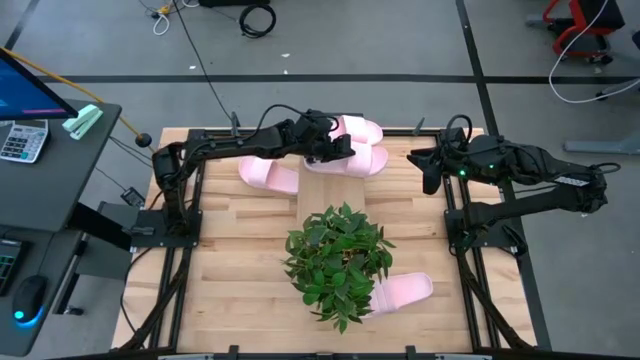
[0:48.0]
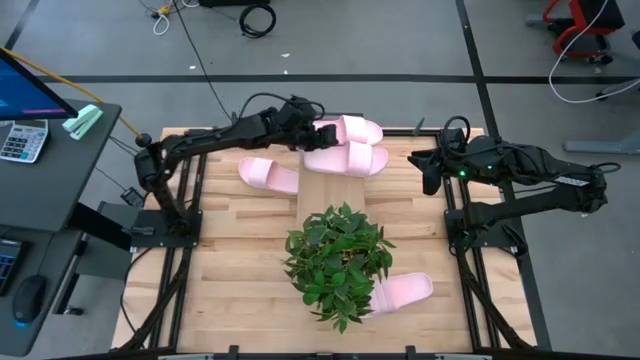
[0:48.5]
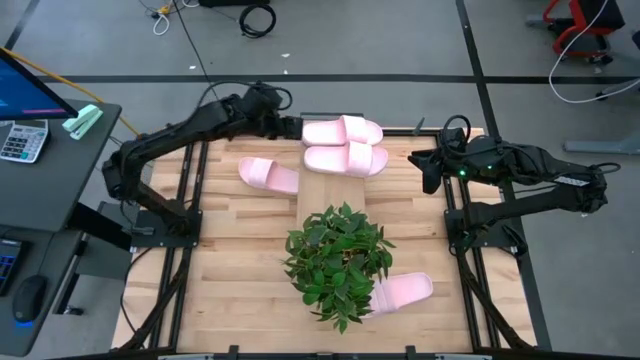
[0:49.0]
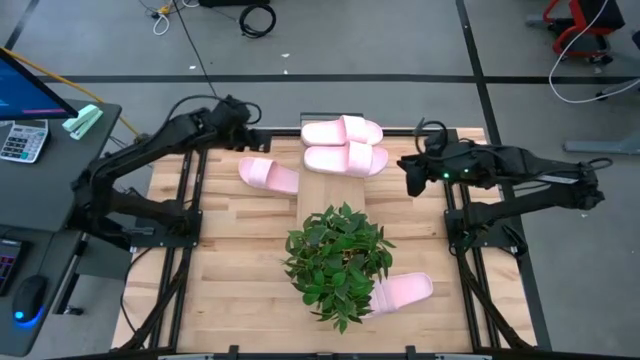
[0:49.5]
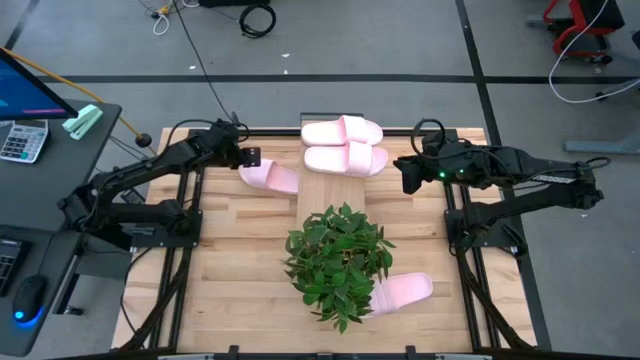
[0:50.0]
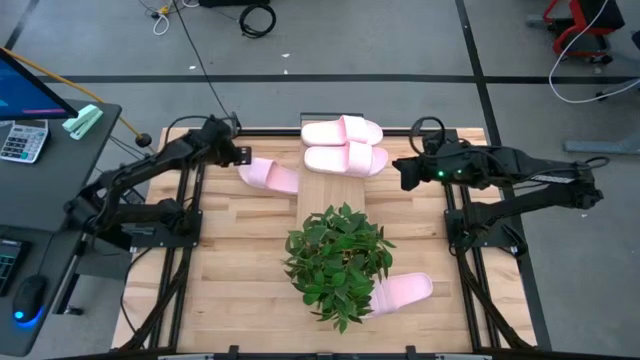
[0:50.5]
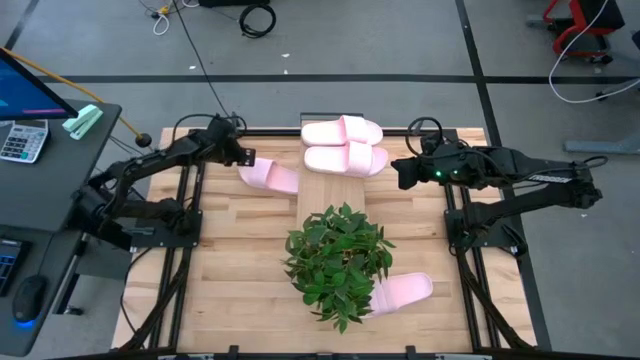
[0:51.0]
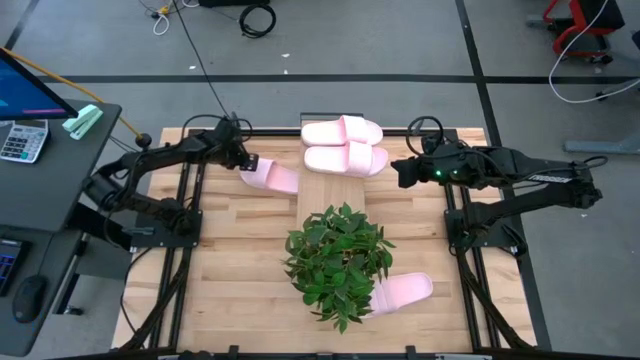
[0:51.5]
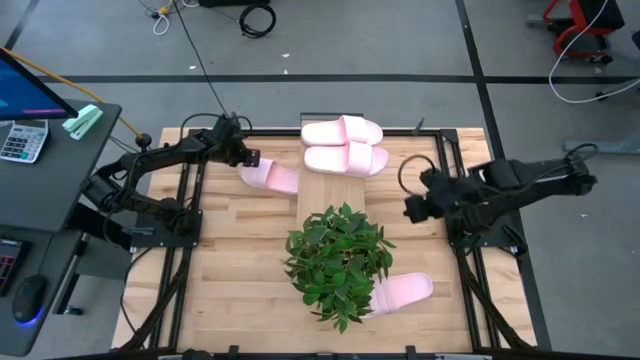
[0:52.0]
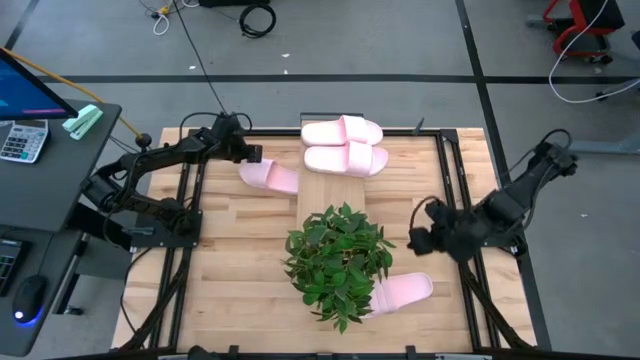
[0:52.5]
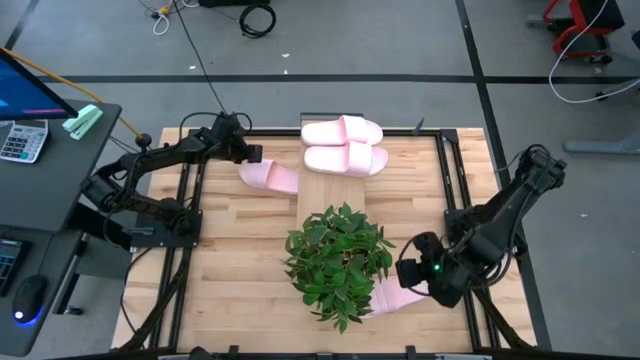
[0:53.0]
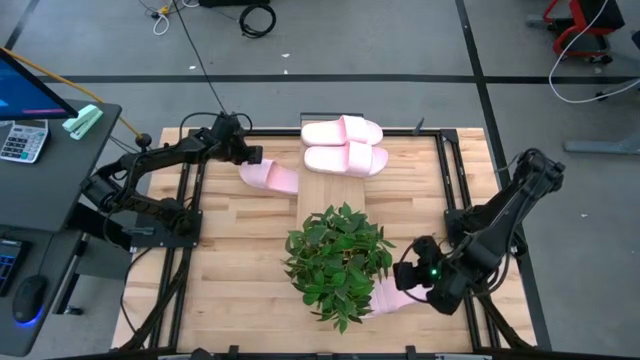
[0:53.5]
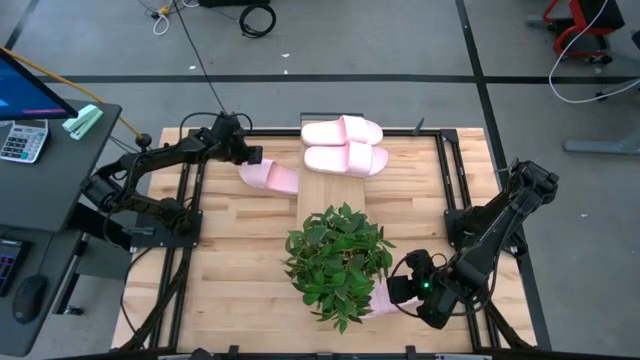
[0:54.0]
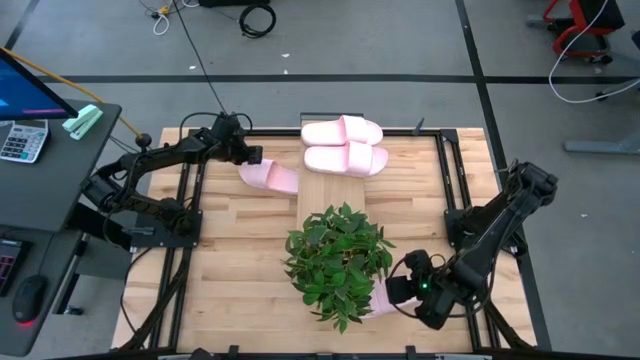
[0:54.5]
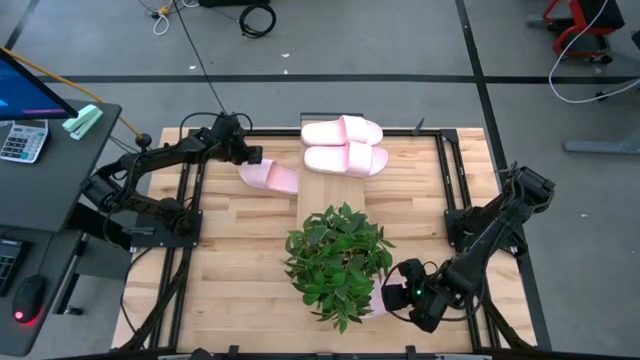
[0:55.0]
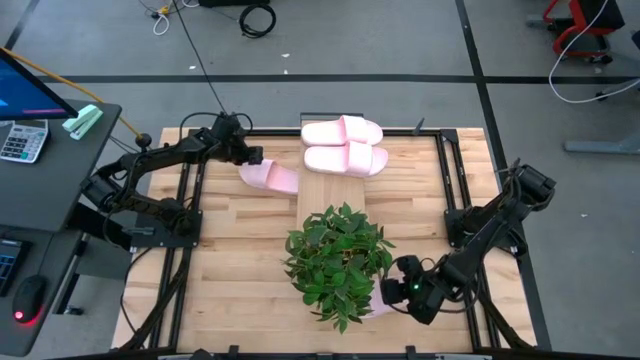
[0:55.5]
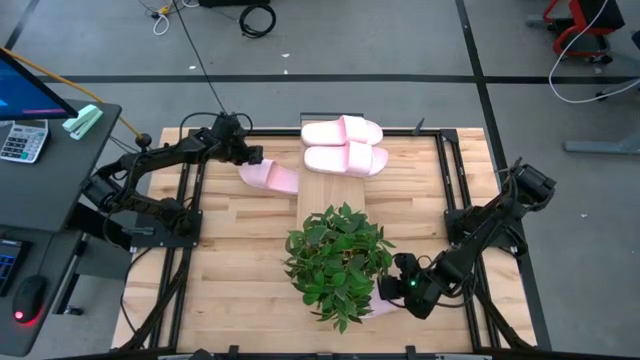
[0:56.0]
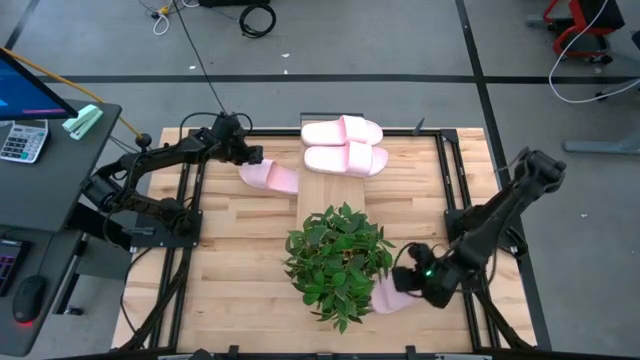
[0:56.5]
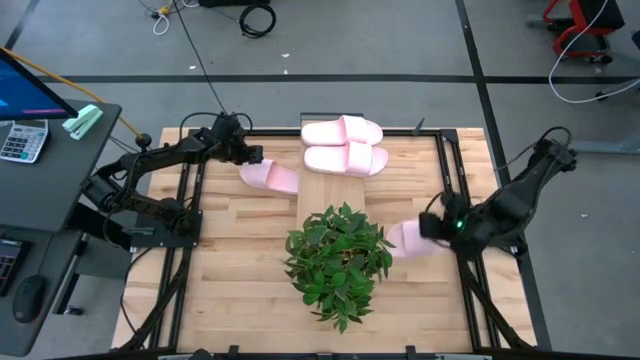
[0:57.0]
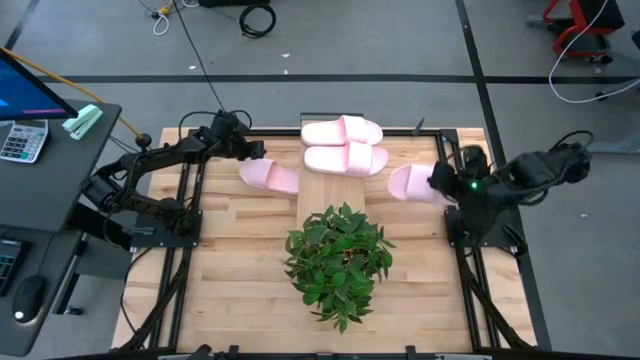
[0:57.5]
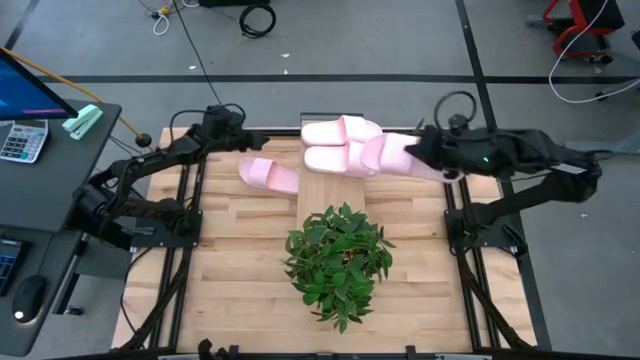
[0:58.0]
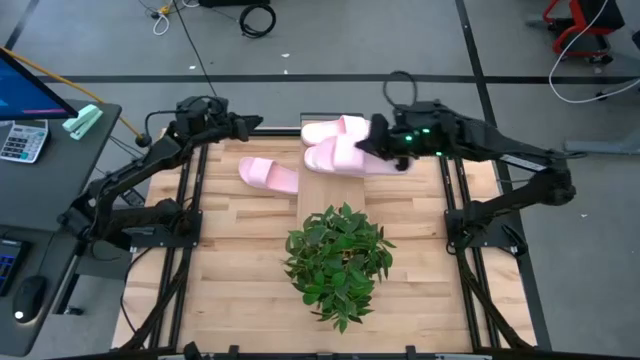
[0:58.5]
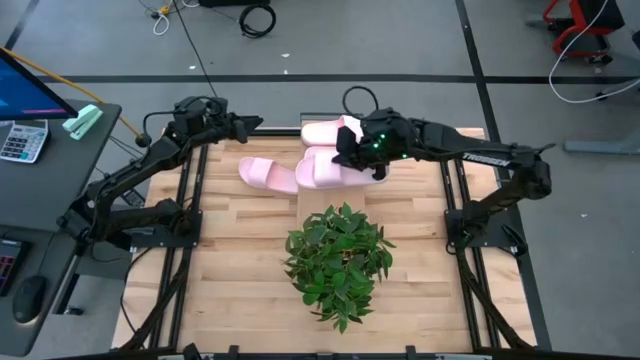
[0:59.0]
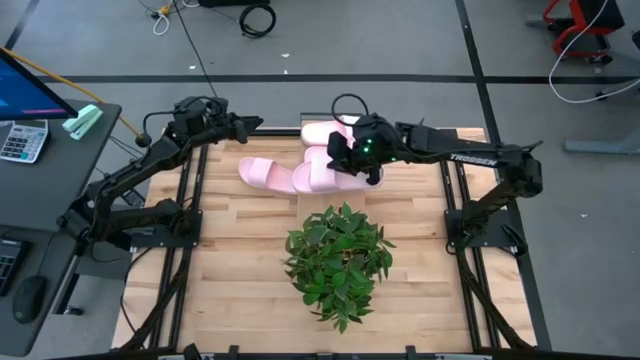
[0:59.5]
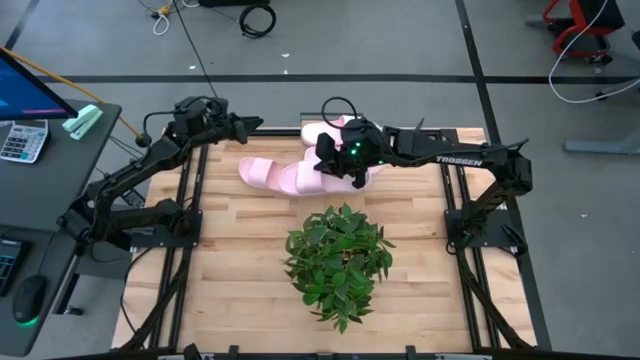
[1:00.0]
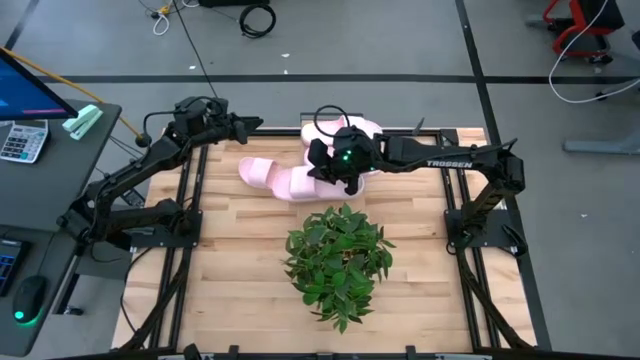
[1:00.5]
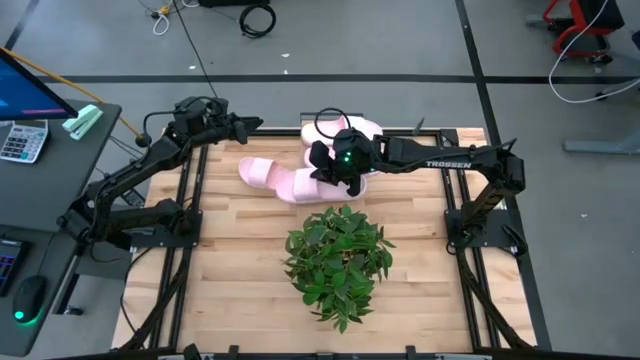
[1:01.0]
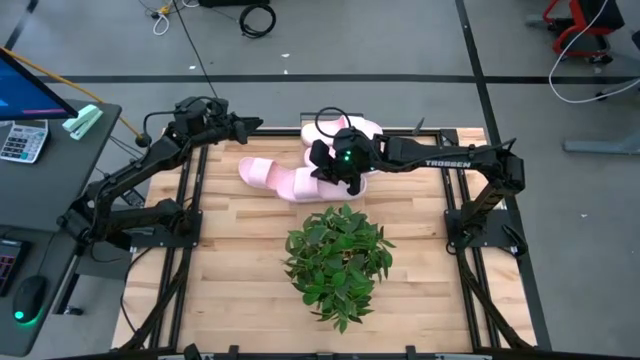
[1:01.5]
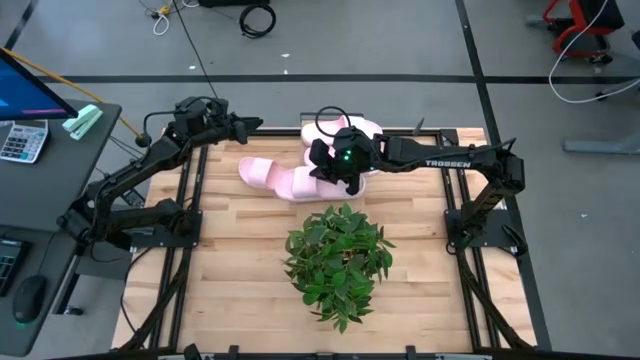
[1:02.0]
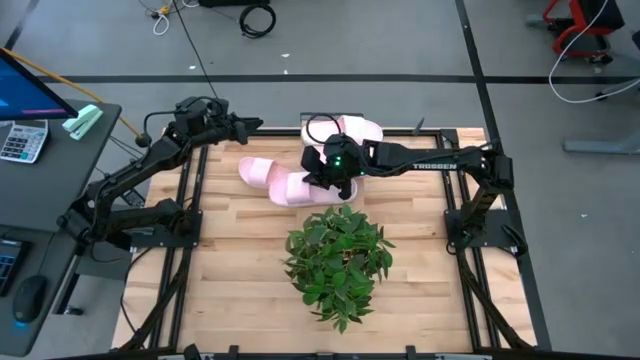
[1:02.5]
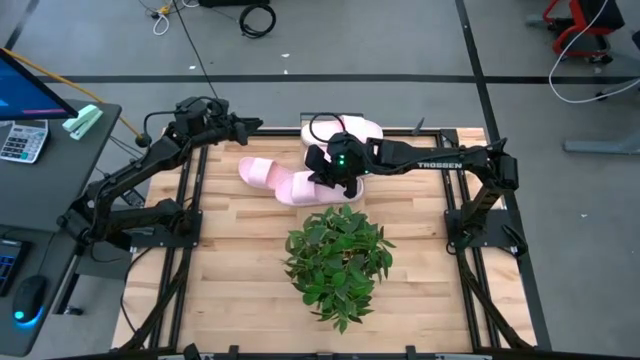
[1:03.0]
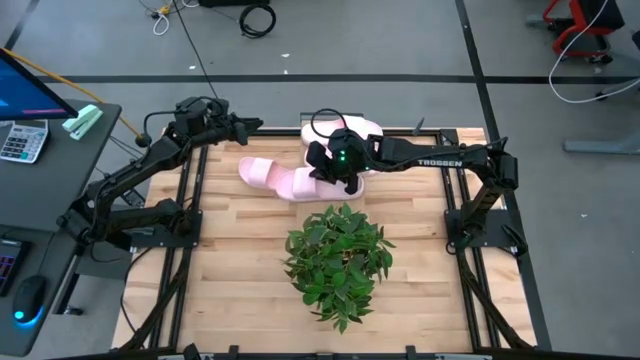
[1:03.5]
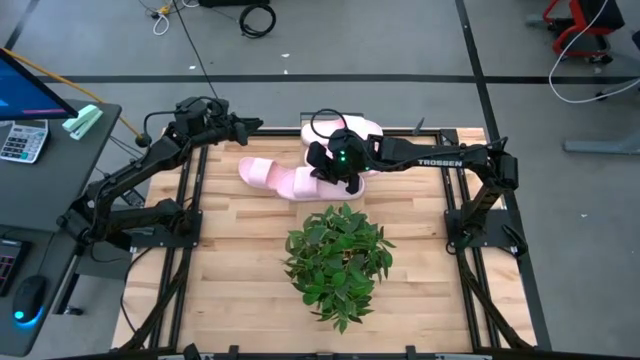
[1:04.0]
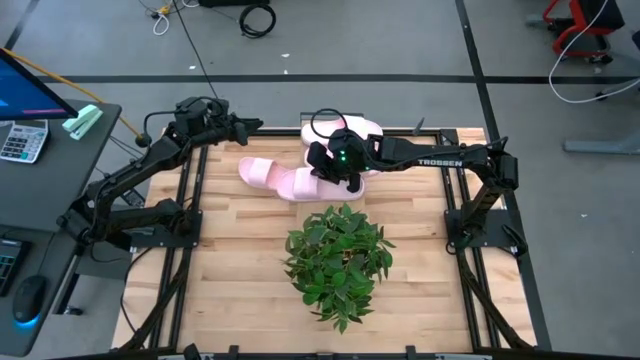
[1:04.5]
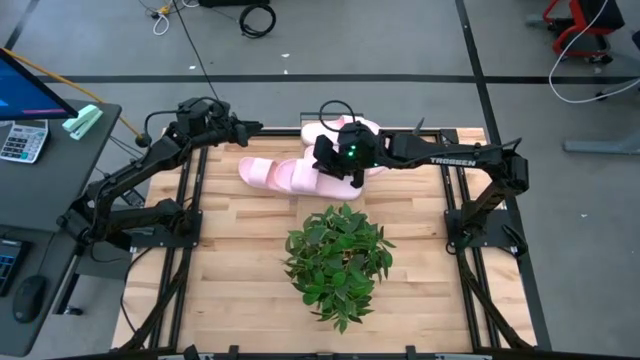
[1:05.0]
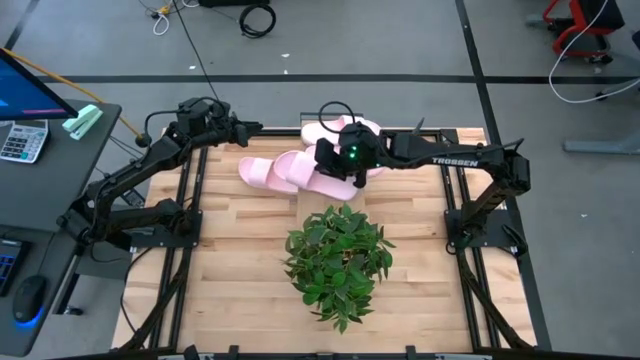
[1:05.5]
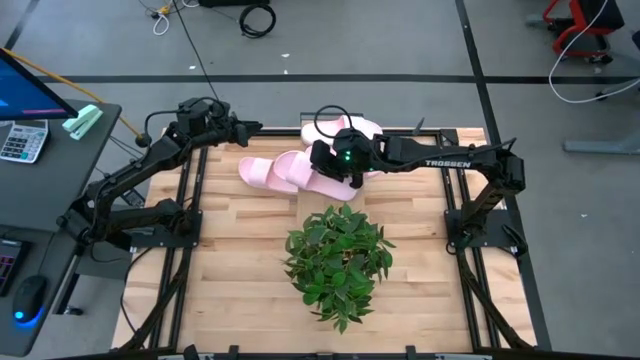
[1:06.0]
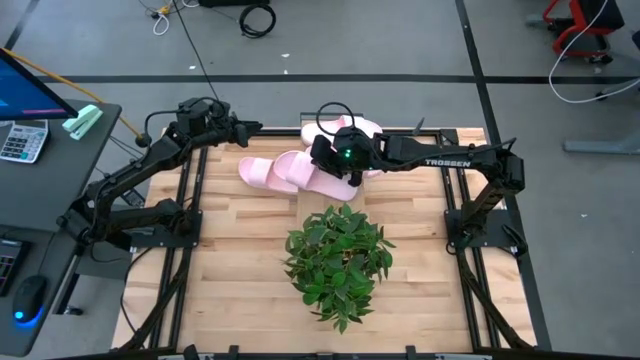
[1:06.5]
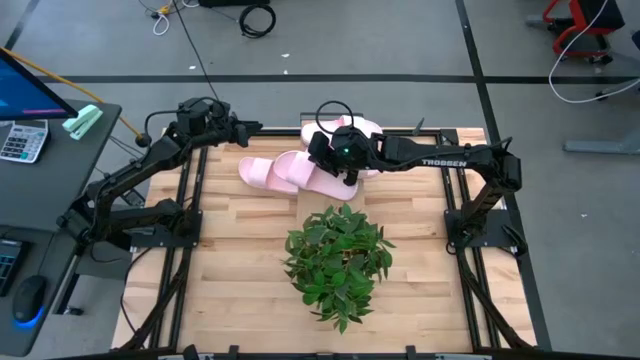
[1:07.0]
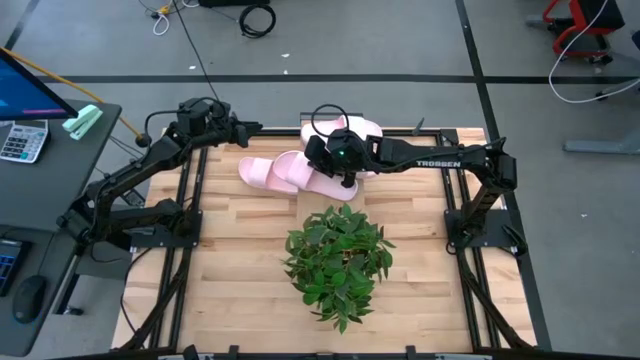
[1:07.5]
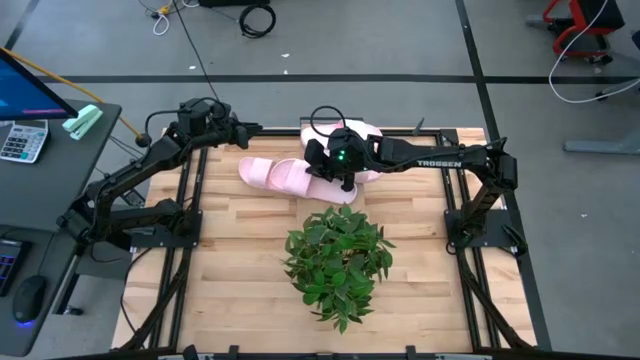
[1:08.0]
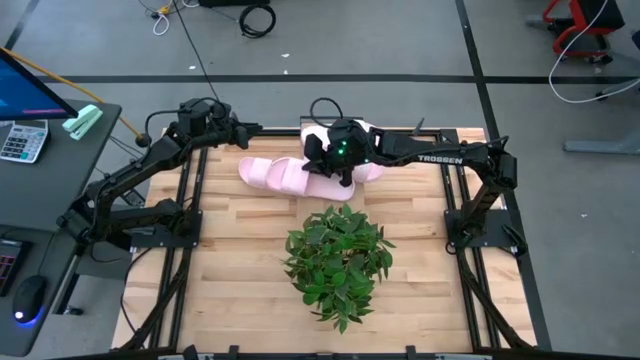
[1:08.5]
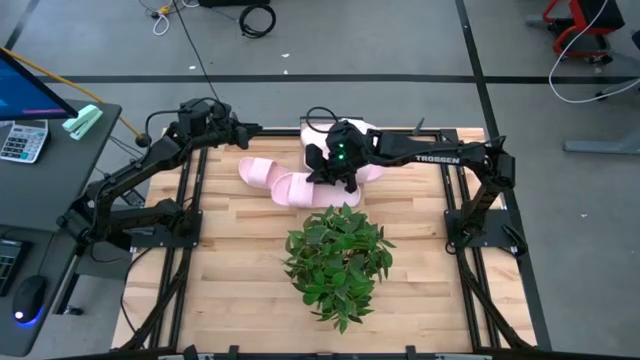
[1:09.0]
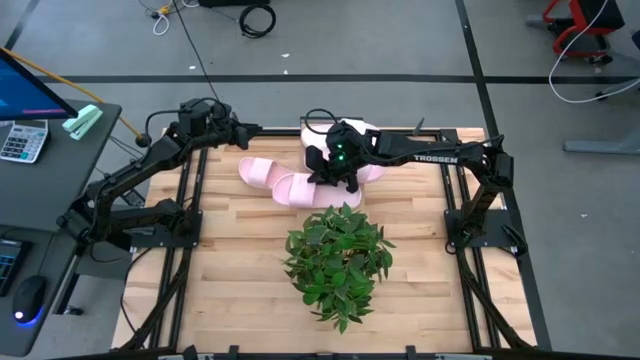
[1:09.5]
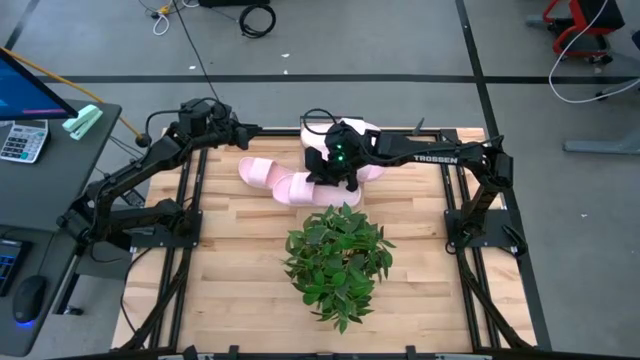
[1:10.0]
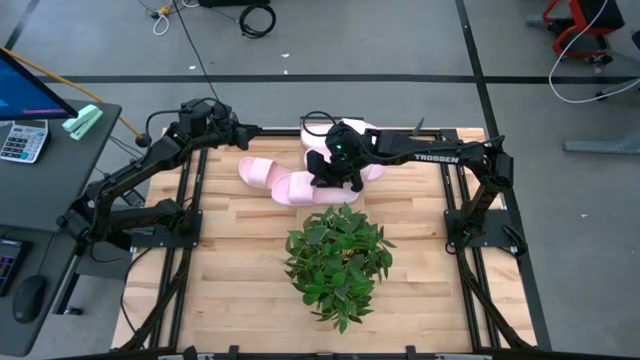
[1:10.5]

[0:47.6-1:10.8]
Task: Pick and place slides into the shelf
Put the pink slide on the shelf
